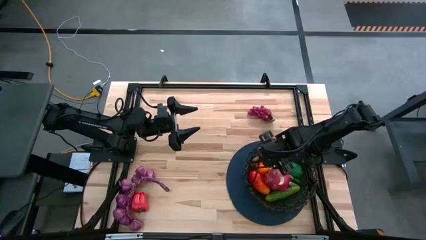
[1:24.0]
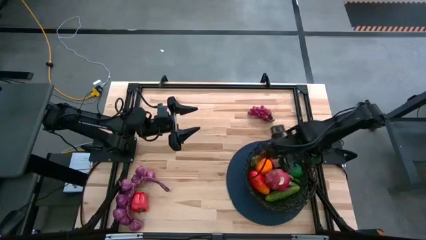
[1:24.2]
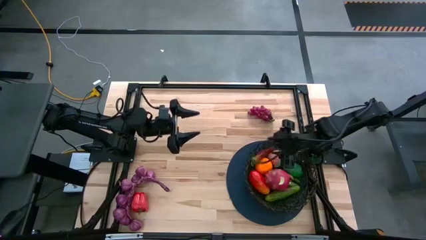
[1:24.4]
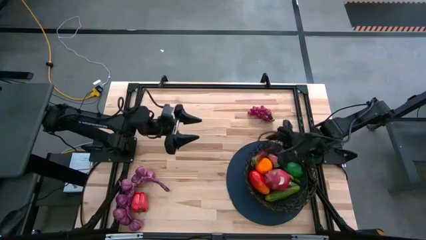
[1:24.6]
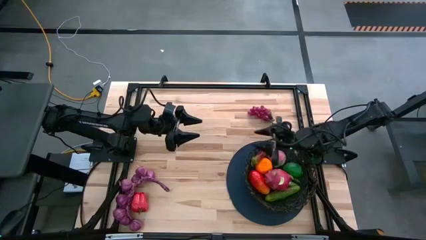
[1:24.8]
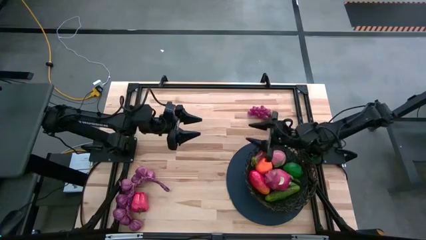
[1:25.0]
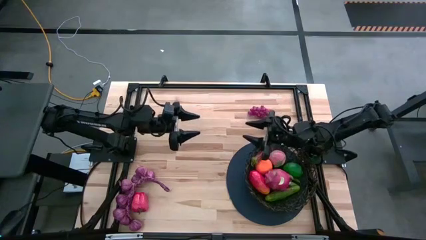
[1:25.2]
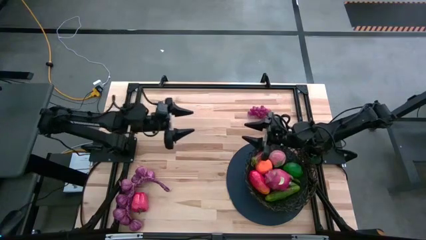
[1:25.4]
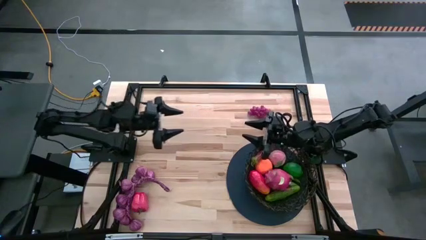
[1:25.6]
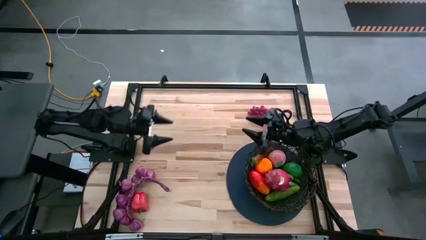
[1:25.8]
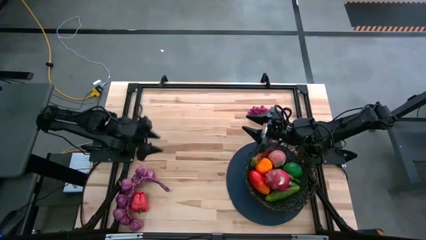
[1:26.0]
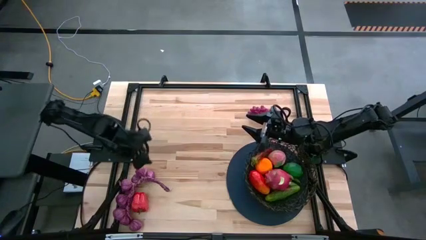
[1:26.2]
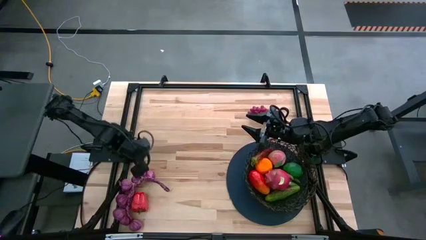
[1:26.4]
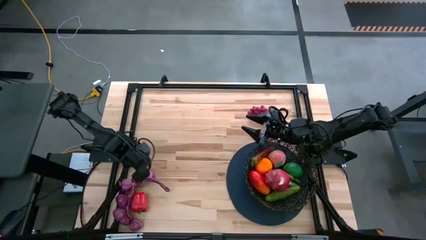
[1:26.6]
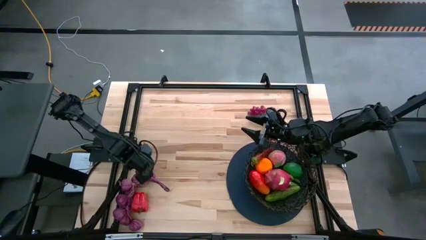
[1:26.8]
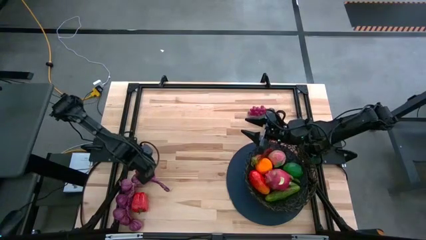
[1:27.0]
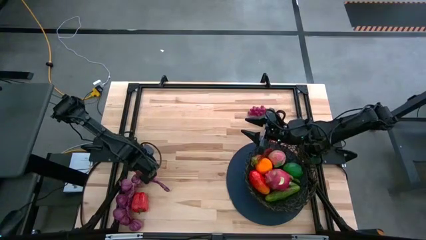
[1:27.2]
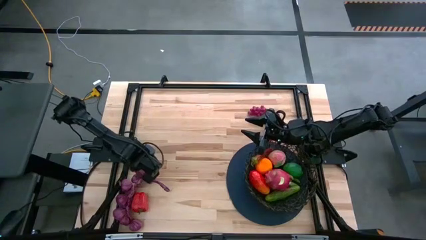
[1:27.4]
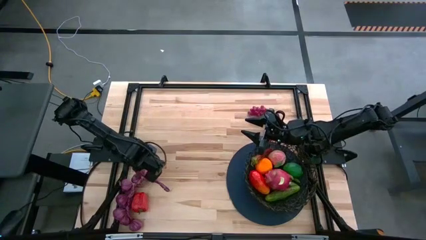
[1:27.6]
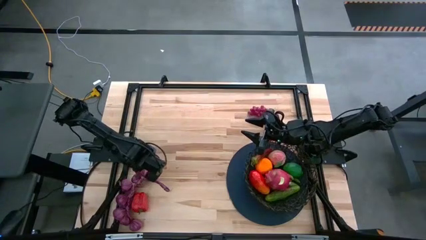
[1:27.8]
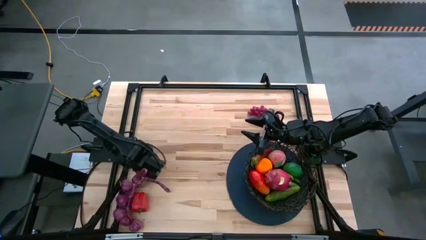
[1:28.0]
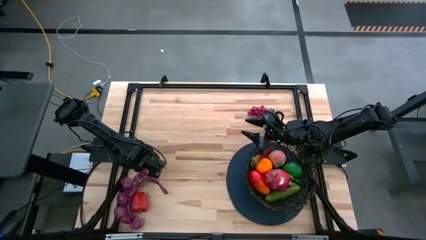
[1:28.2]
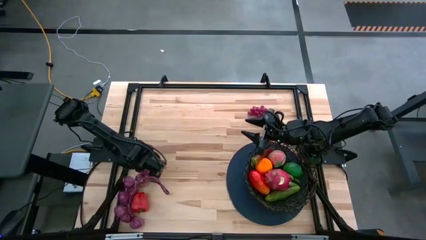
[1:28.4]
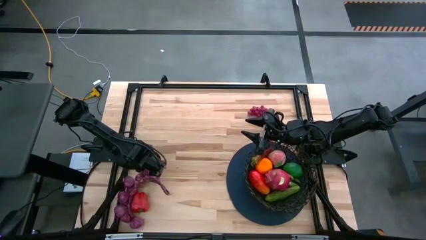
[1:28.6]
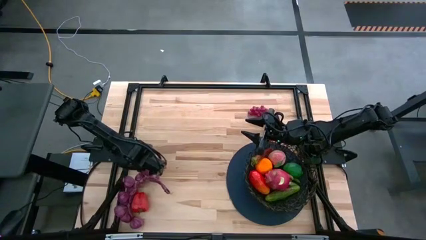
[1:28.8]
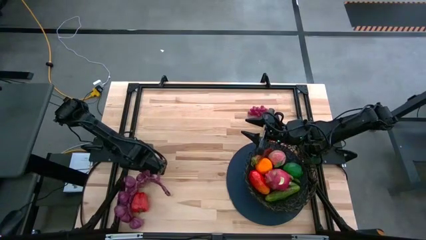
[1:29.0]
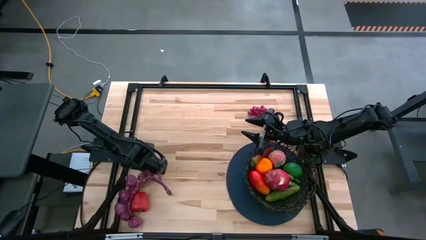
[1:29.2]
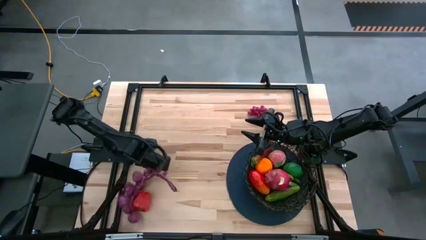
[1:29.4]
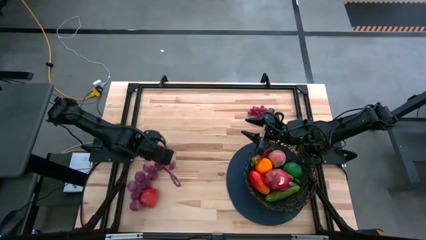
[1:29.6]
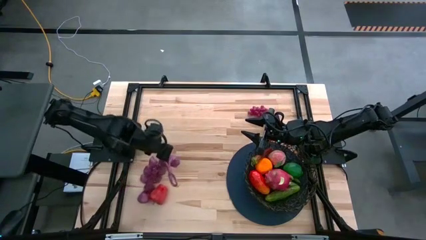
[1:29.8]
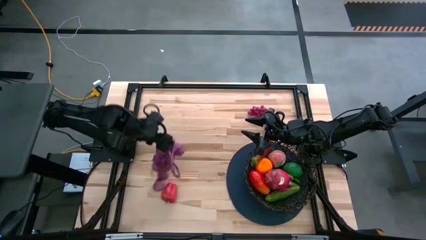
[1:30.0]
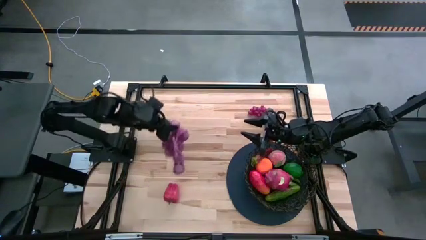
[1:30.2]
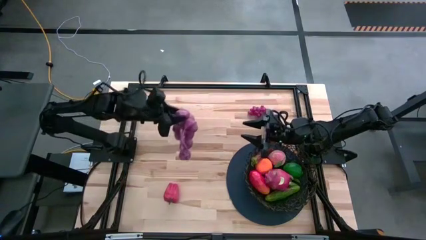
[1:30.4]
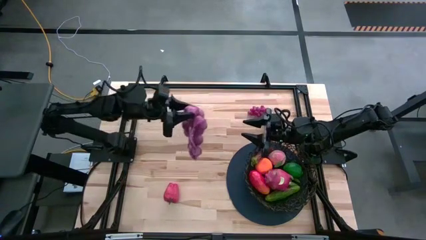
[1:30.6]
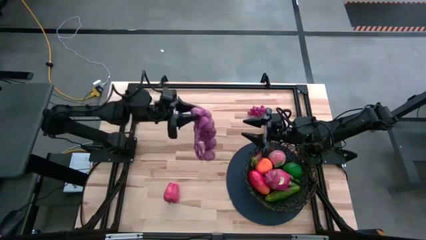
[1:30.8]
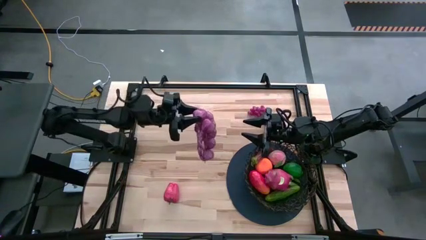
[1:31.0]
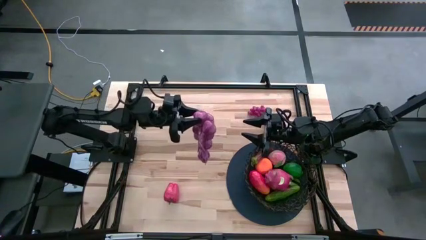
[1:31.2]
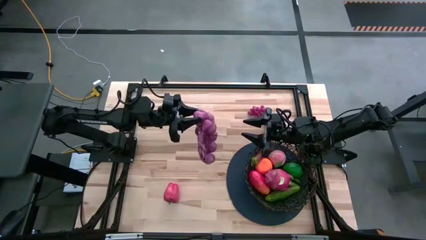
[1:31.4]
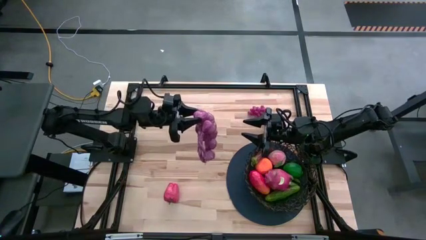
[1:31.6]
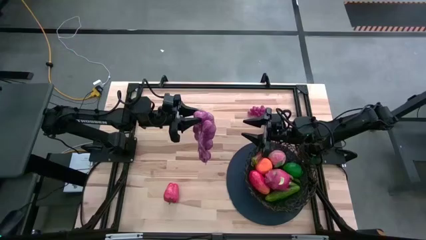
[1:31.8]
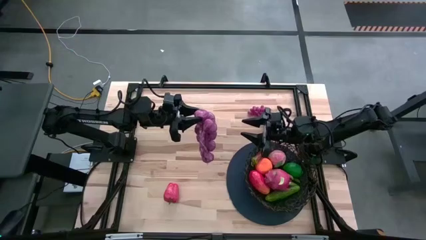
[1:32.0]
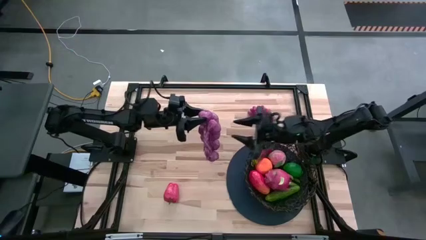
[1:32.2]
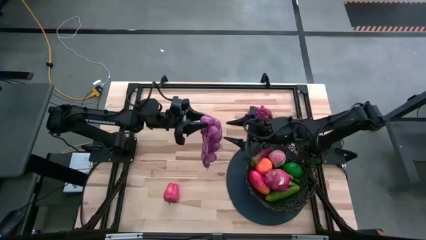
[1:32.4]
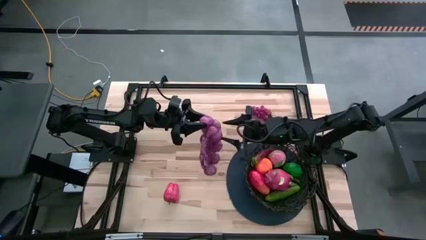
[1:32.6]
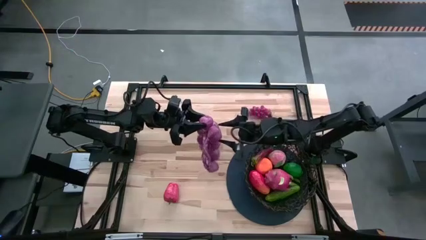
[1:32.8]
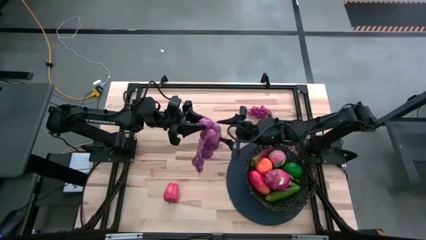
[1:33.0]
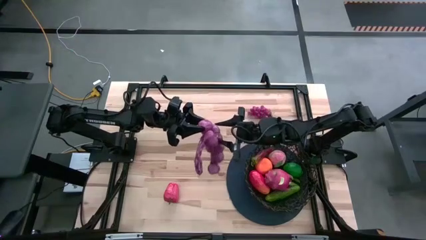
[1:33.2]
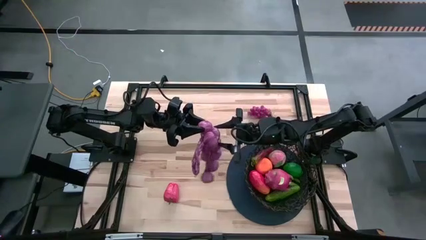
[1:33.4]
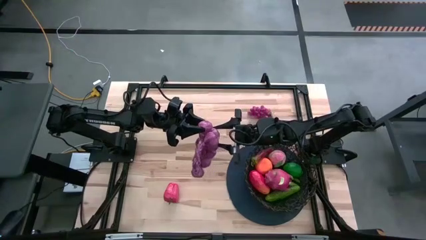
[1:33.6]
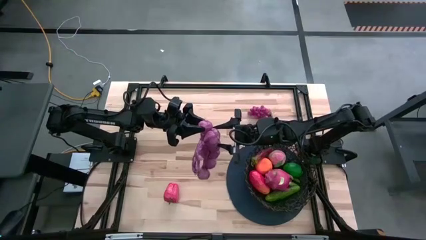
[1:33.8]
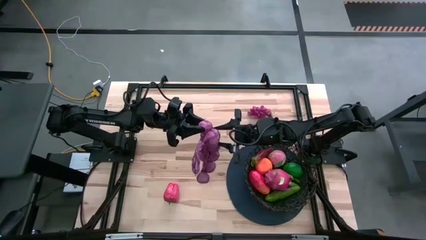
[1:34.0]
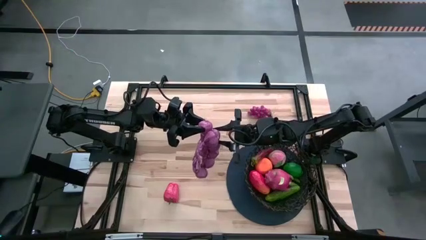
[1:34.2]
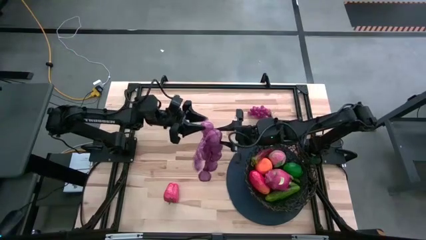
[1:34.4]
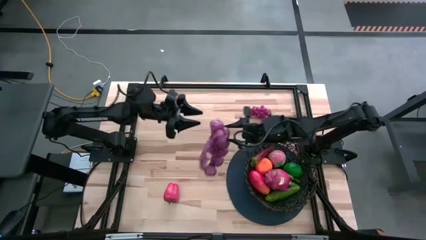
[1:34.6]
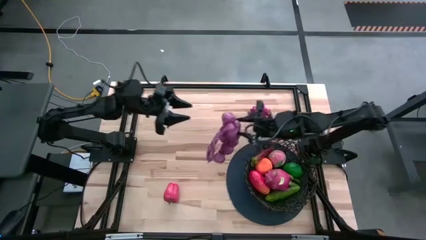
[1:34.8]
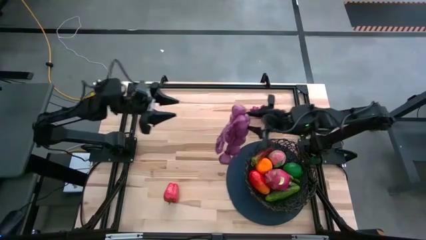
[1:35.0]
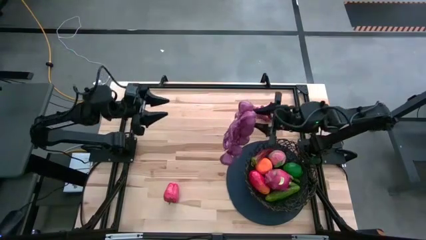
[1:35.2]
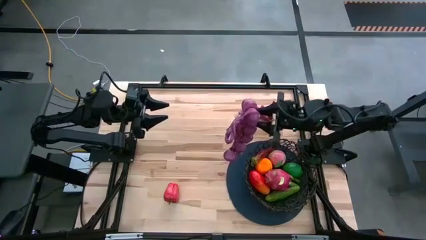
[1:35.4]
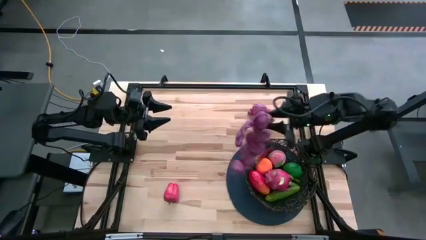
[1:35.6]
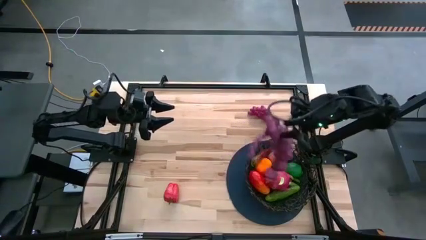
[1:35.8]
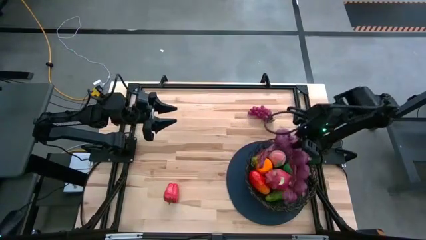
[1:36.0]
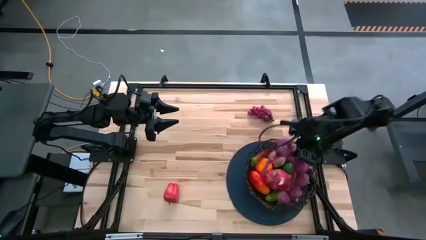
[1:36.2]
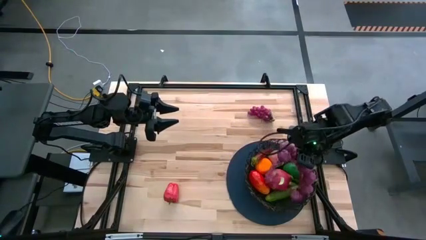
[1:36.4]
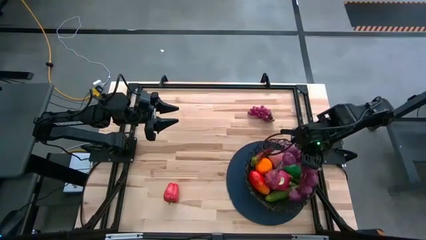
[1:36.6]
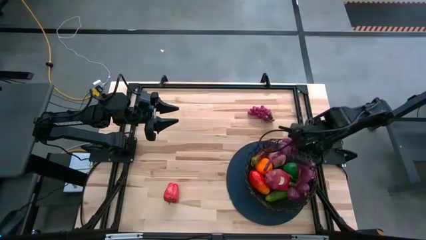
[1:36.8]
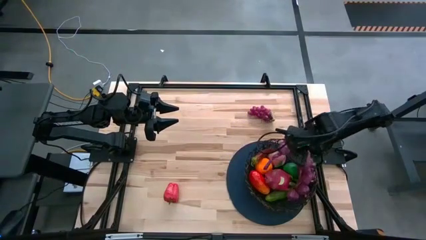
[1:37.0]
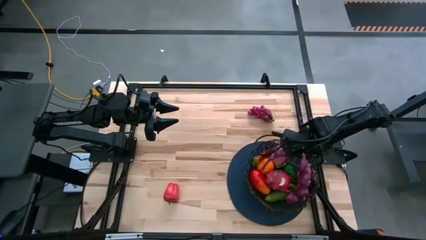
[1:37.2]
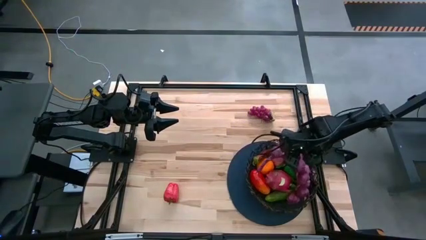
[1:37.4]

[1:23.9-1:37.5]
Task: Build produce basket
Put the purple garlic into the basket

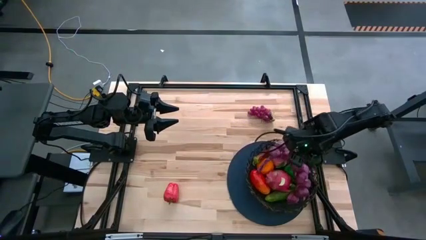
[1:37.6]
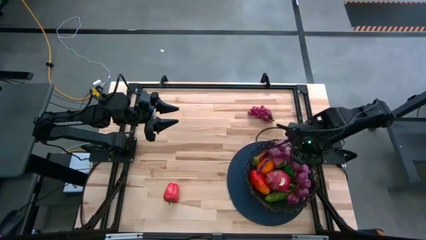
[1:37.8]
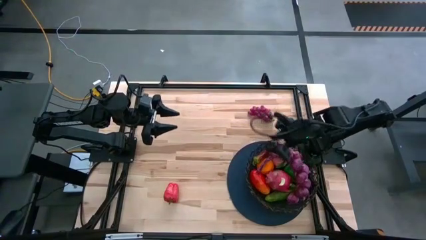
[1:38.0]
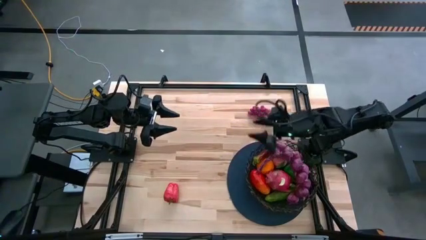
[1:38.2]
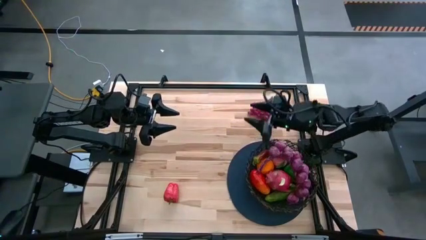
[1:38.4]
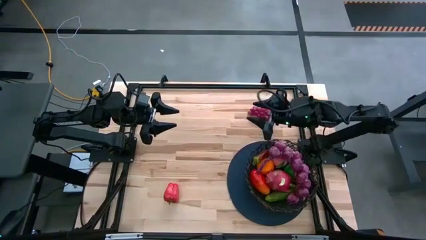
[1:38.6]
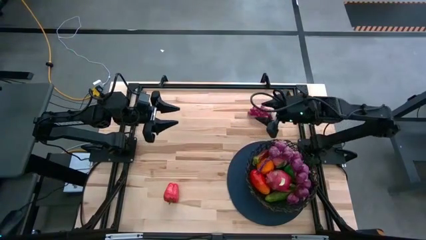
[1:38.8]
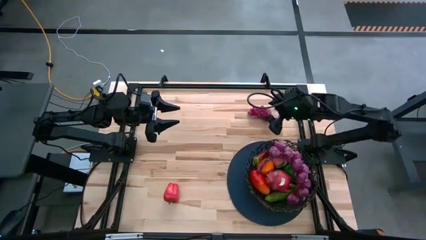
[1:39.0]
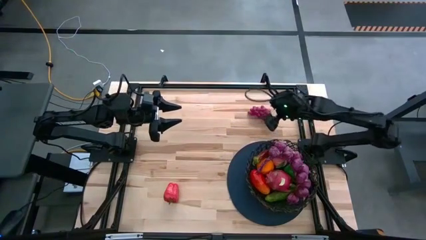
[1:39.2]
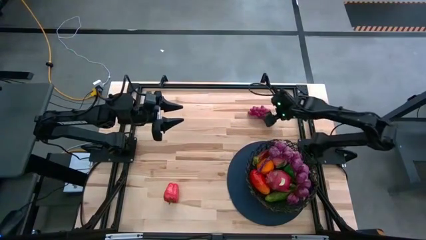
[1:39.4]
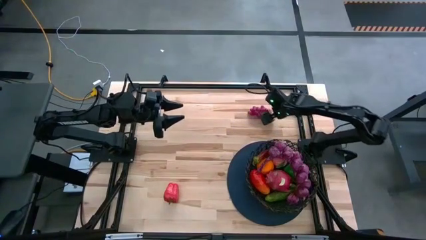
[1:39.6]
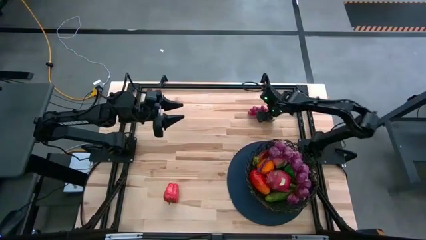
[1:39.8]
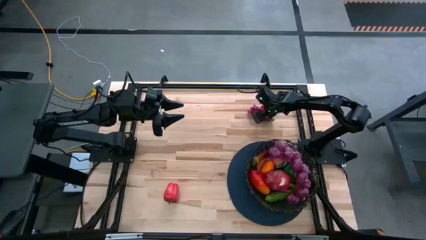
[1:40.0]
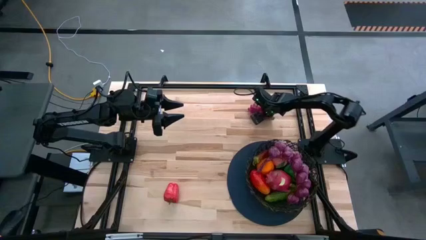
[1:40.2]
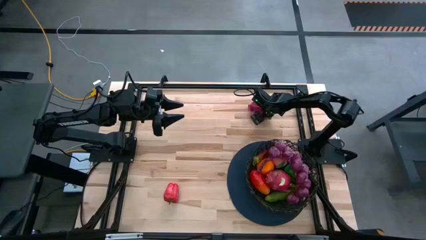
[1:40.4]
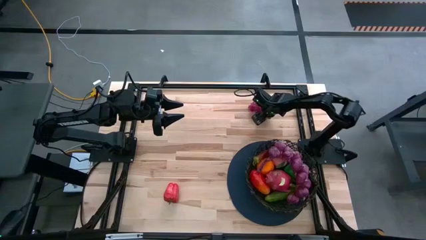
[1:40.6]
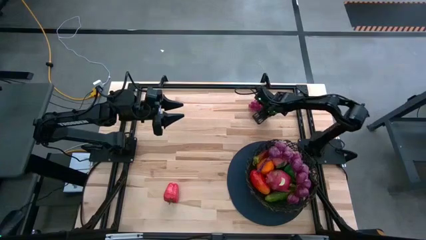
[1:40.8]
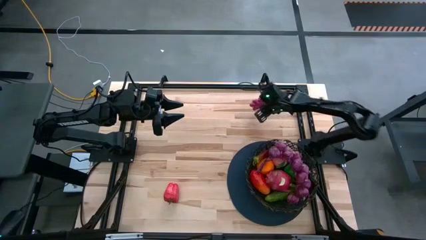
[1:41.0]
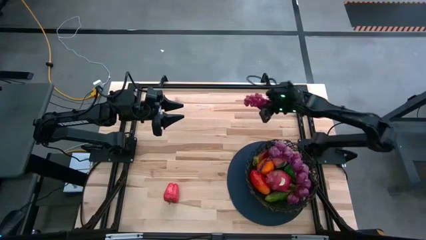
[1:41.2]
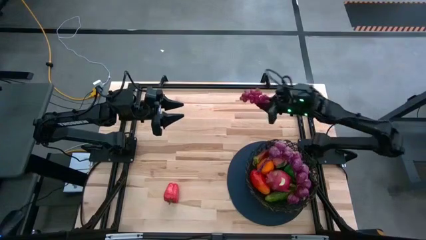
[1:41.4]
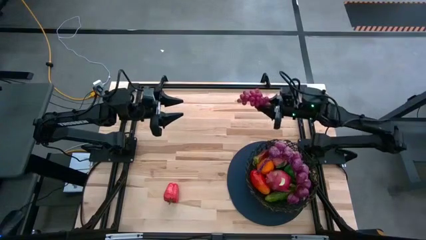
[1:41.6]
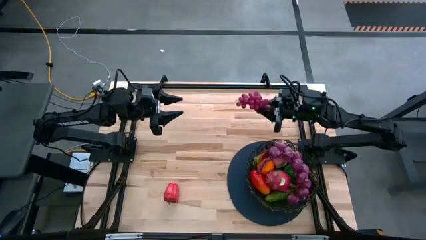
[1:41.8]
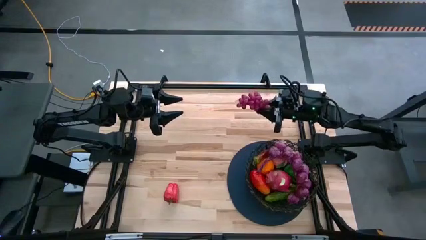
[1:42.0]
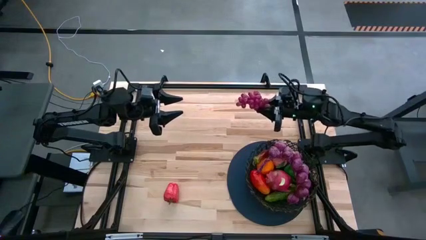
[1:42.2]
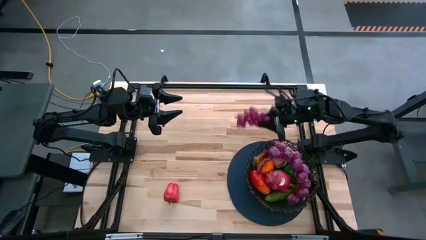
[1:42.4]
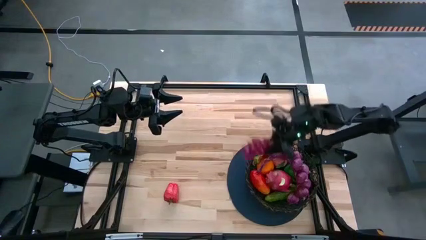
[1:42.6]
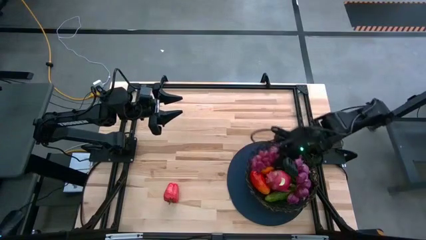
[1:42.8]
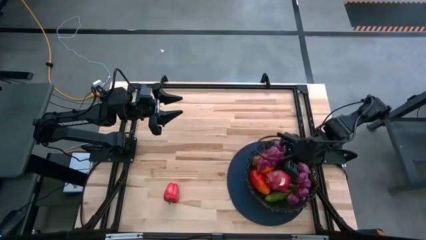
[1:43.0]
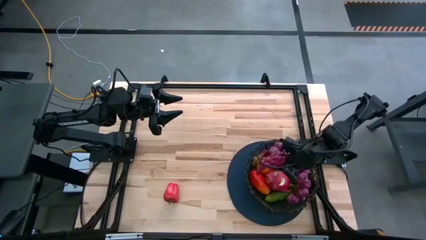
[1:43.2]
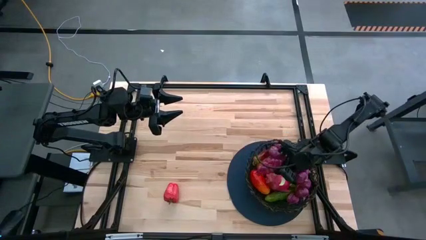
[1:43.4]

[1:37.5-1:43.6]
Put the purple grapes into the basket
